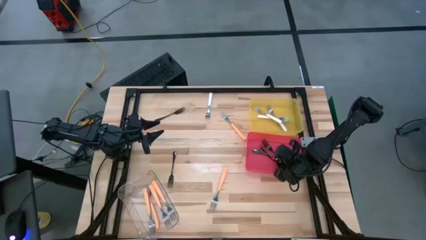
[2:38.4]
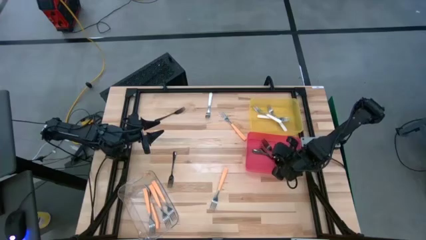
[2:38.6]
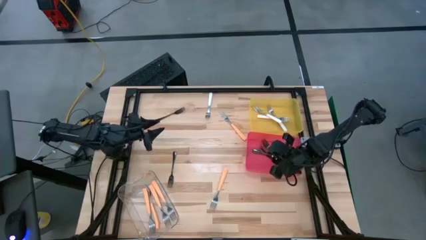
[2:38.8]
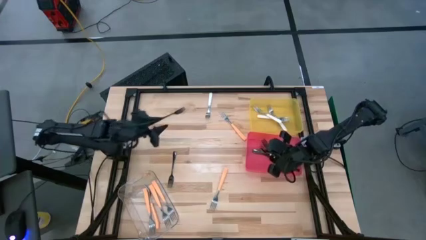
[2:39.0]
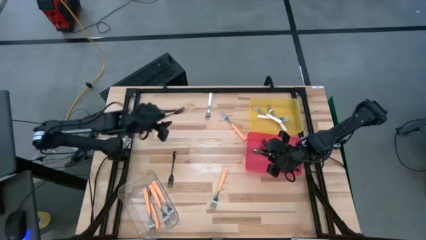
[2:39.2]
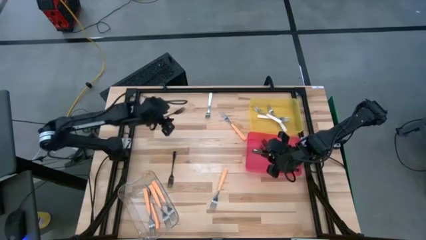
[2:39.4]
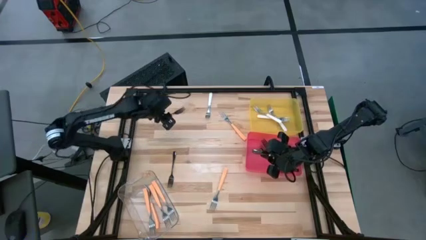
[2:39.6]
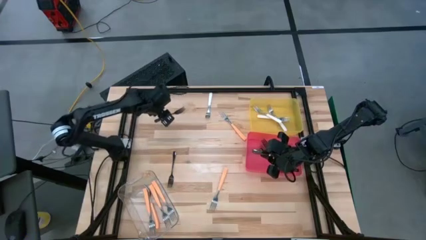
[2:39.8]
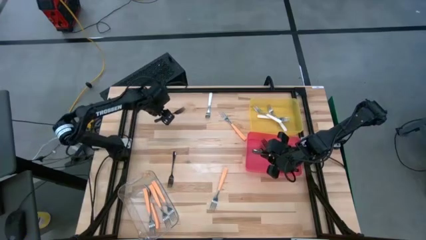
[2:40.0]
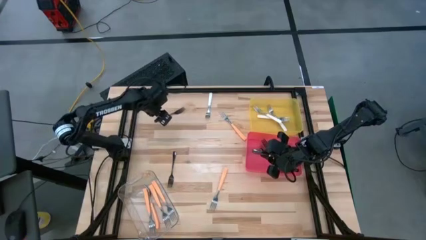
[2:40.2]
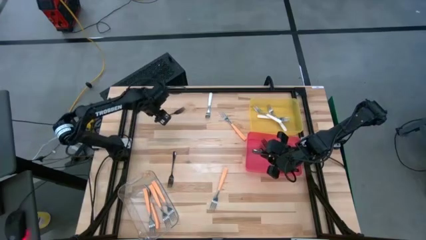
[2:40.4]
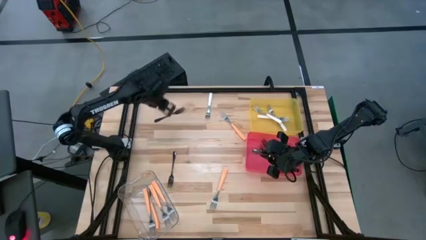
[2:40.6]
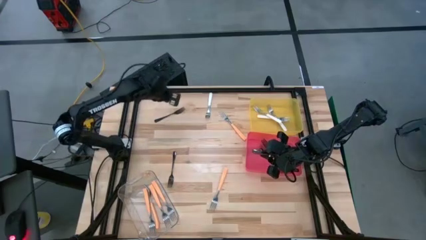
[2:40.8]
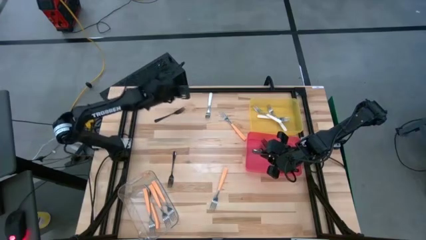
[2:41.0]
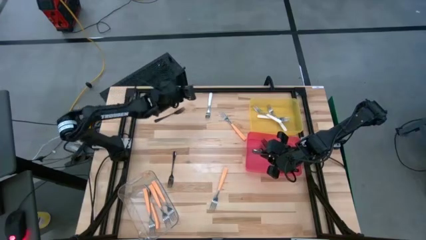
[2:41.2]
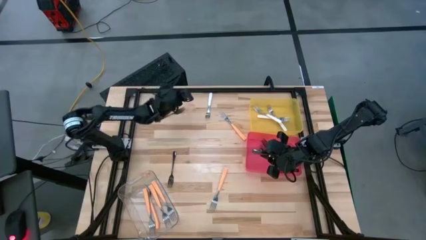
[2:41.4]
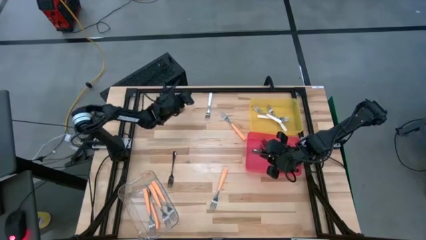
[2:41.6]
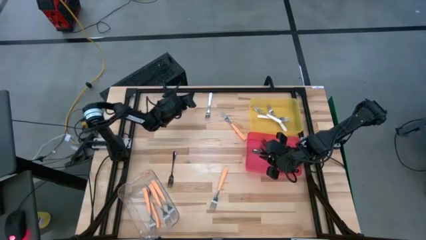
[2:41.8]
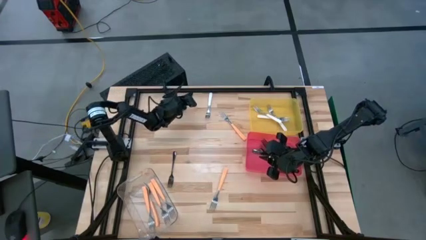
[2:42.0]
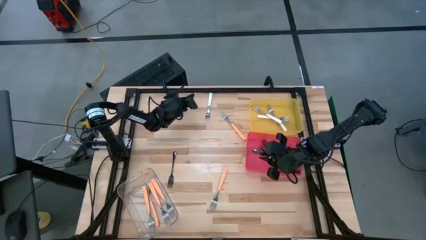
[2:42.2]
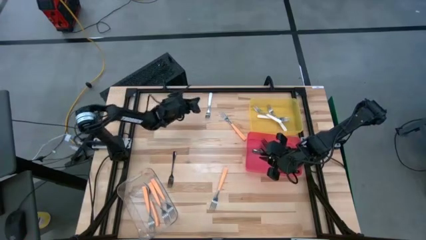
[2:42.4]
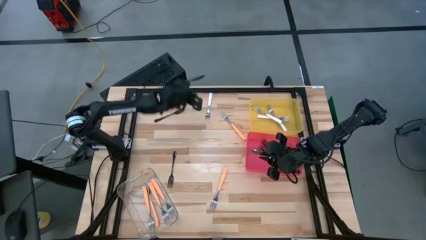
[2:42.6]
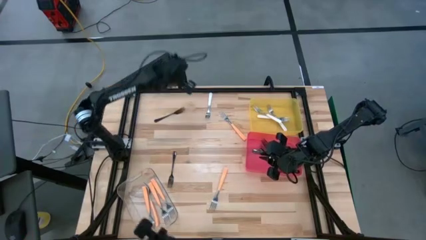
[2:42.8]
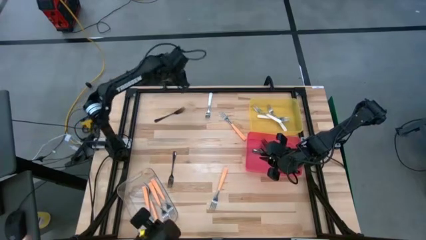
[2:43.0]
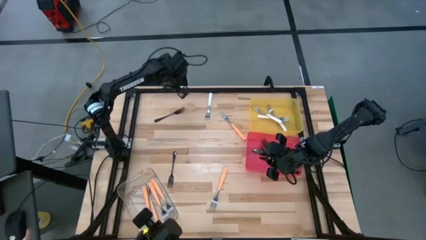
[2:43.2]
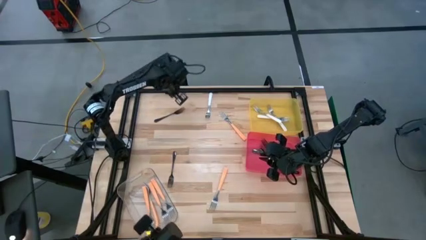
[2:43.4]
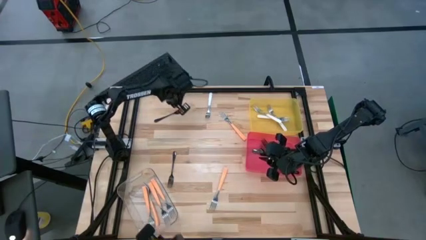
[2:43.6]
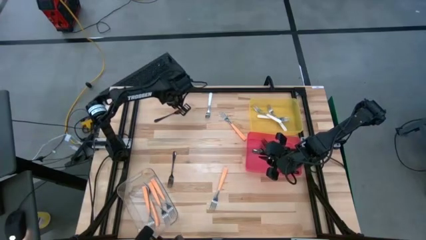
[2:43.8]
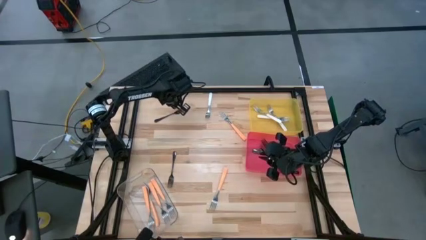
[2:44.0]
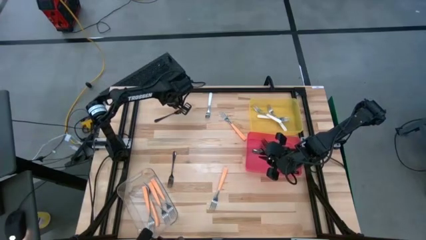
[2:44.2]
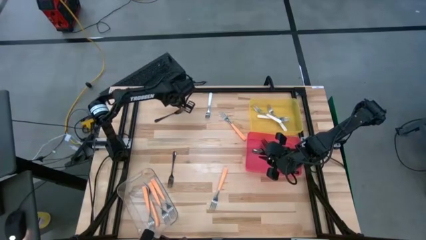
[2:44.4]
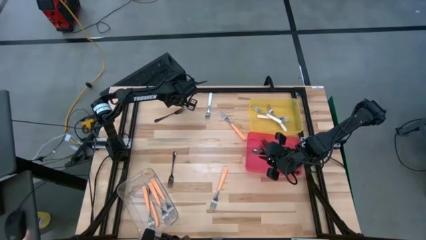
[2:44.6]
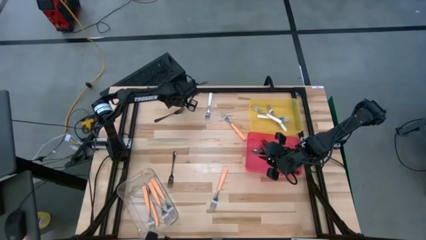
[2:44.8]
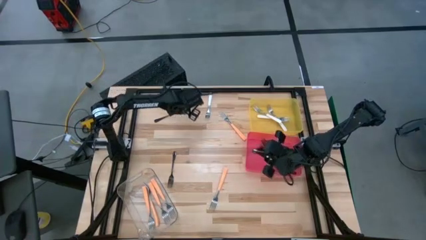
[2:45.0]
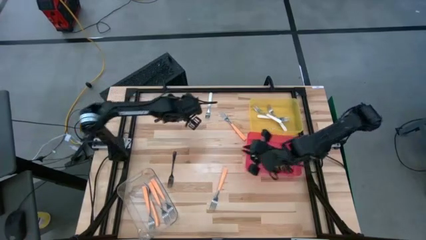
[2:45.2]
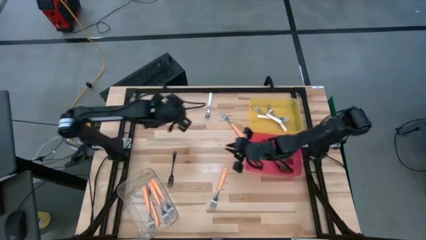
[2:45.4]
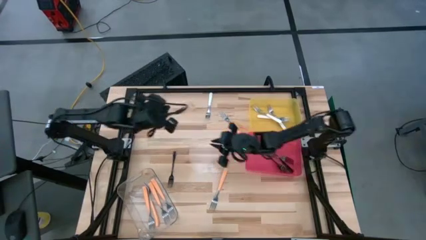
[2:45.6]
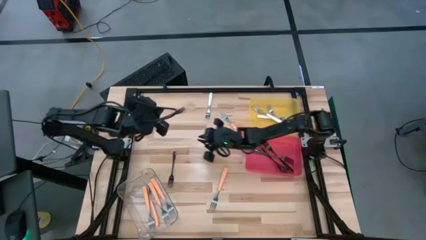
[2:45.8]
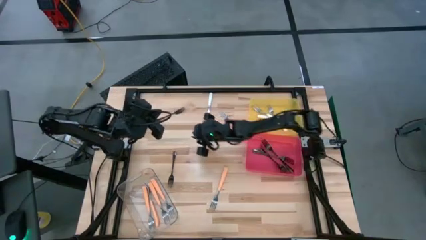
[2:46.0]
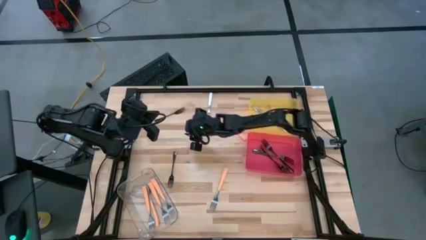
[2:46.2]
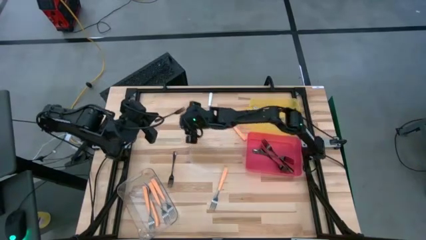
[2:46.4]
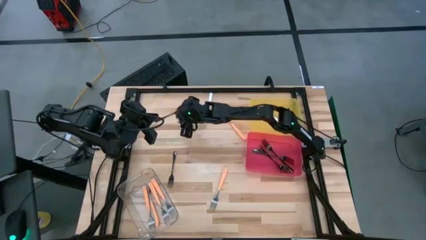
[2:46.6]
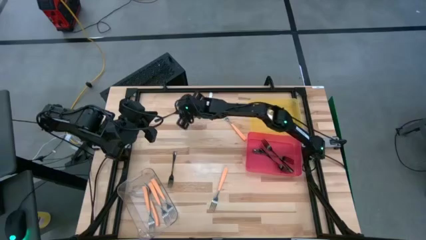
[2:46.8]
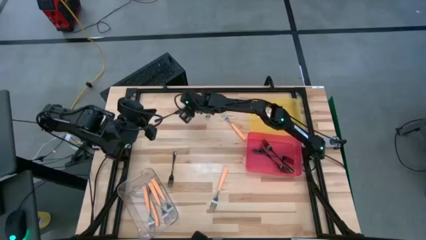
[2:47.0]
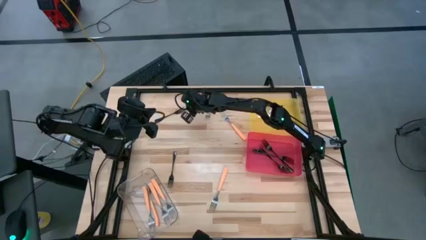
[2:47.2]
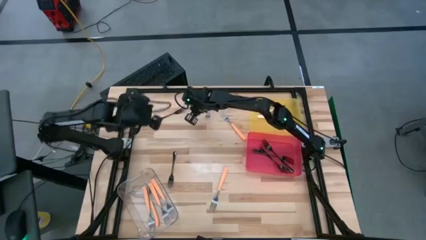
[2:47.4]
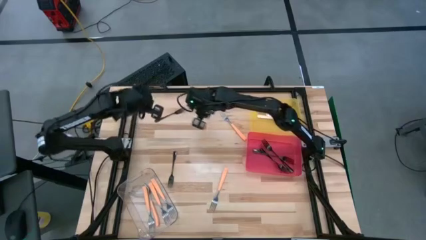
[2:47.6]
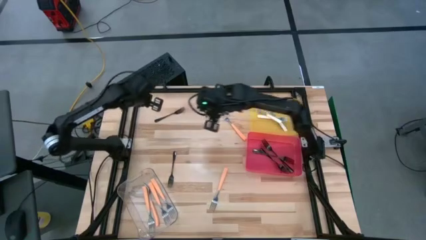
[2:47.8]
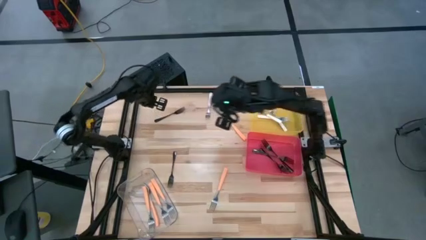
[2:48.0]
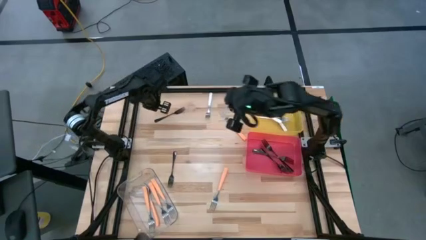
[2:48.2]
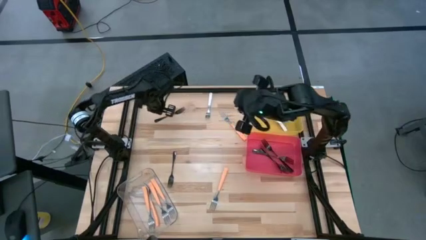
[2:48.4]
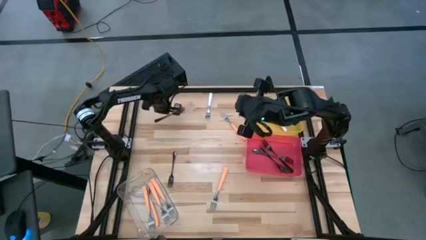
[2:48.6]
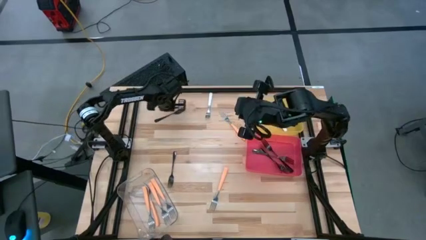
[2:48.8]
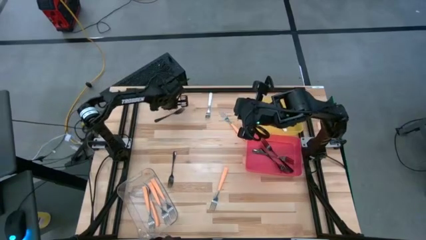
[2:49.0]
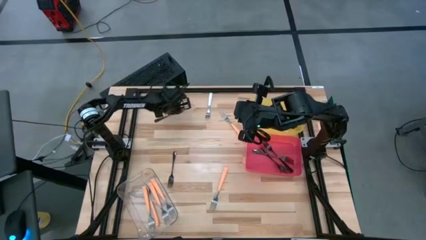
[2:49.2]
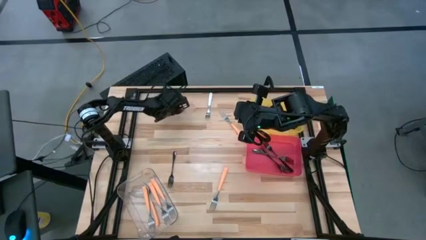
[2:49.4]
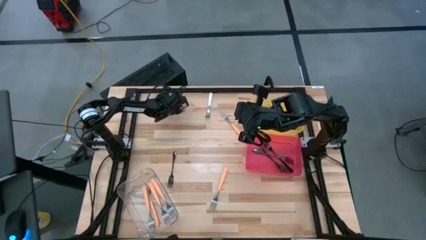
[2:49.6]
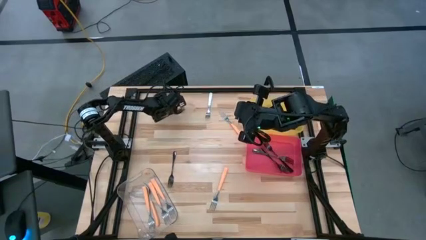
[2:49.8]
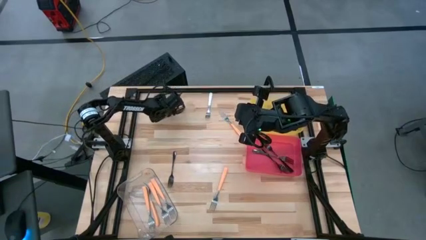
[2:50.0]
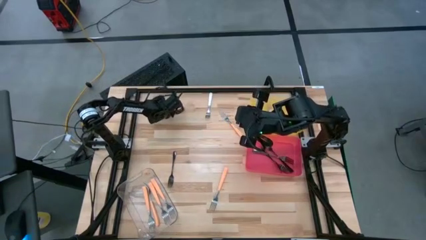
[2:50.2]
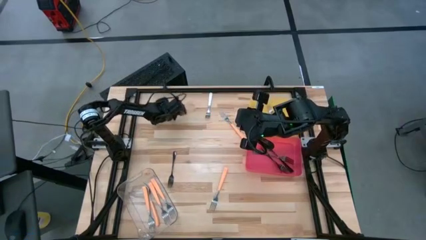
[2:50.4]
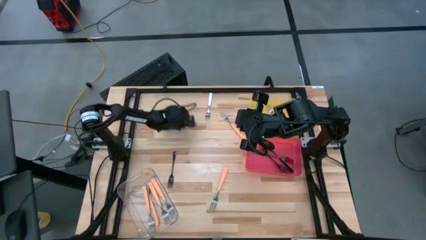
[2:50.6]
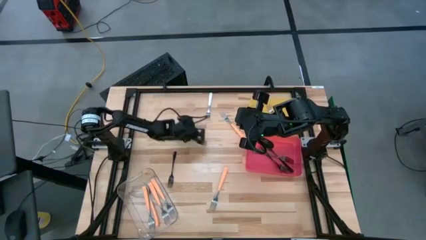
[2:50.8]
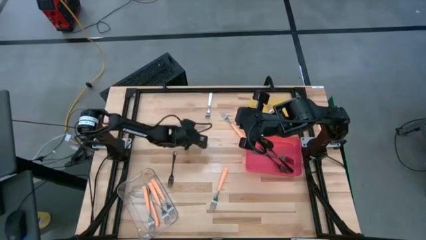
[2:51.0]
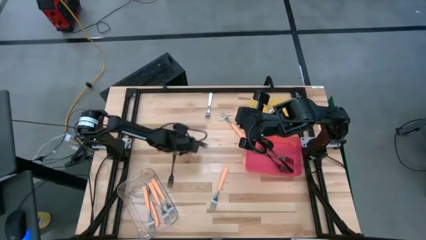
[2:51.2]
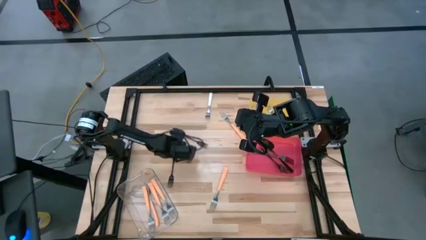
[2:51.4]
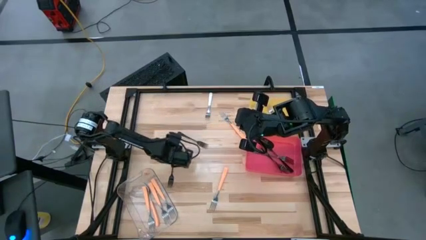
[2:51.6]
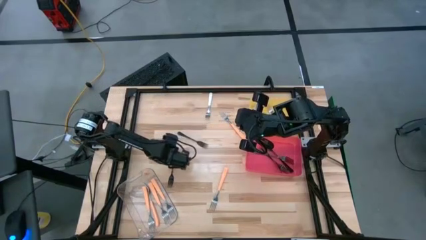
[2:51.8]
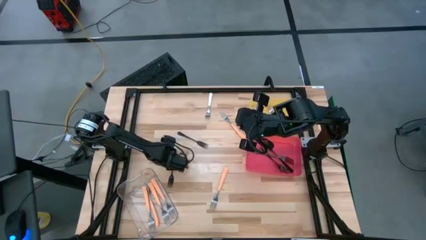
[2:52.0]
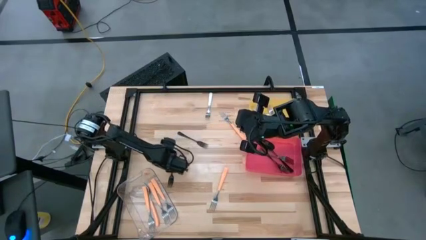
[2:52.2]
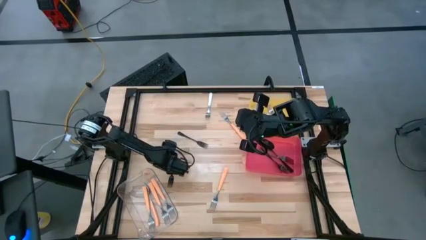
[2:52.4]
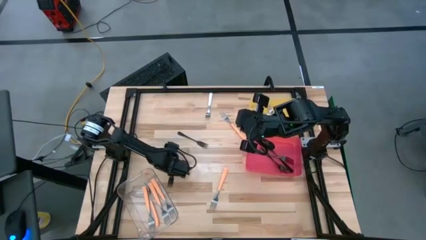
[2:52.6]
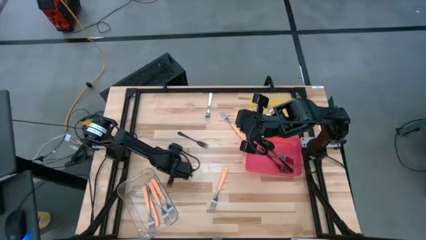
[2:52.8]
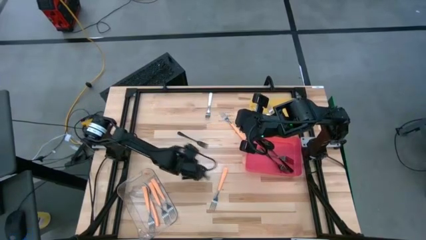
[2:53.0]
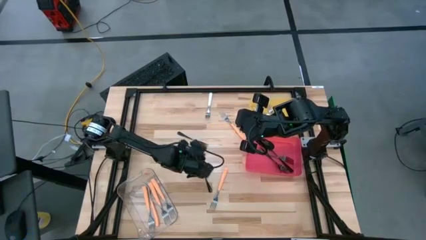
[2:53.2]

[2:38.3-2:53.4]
Task: Sort silverware by color (type)
Move the black forks to the center of the table

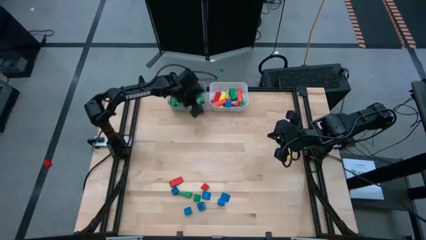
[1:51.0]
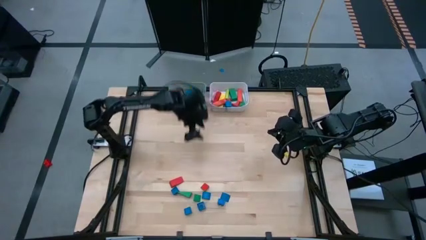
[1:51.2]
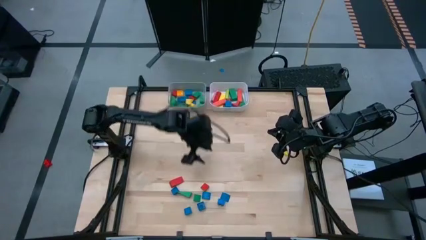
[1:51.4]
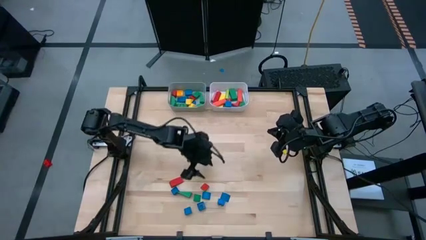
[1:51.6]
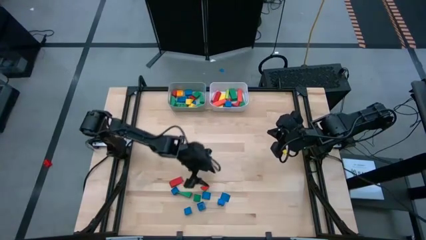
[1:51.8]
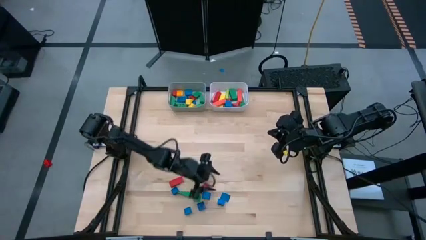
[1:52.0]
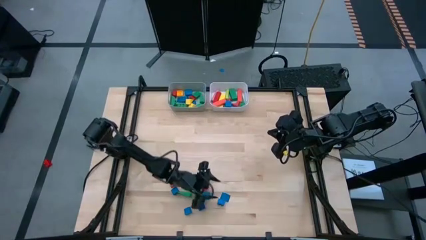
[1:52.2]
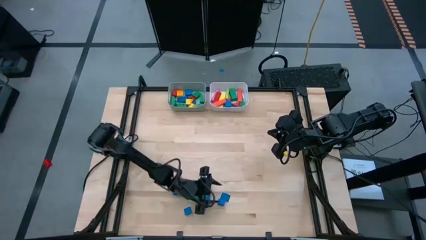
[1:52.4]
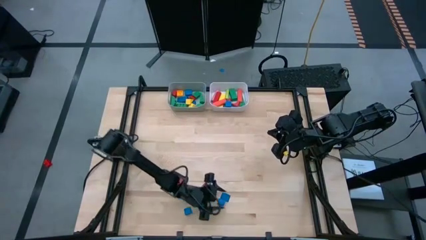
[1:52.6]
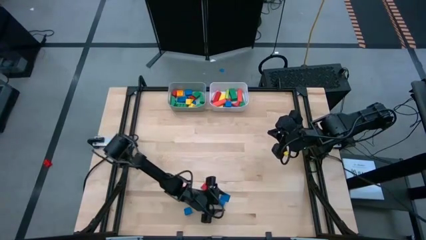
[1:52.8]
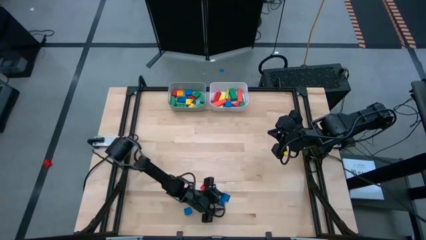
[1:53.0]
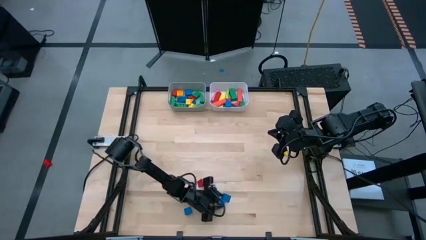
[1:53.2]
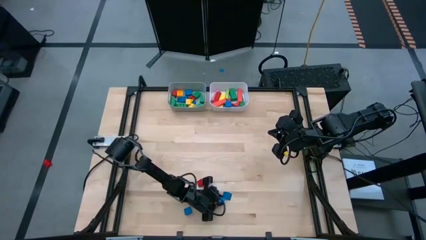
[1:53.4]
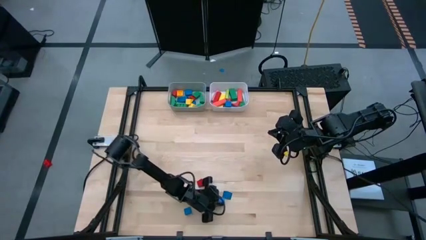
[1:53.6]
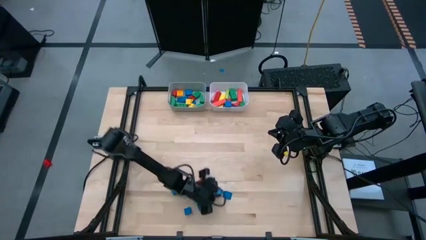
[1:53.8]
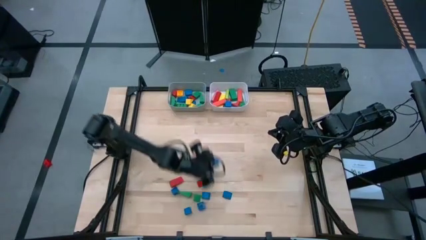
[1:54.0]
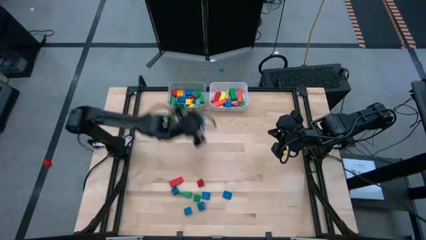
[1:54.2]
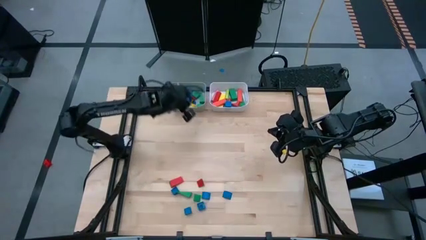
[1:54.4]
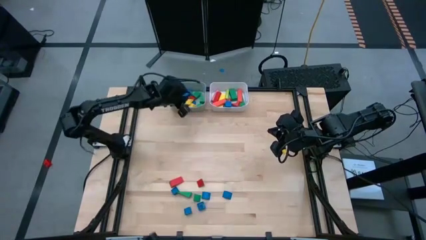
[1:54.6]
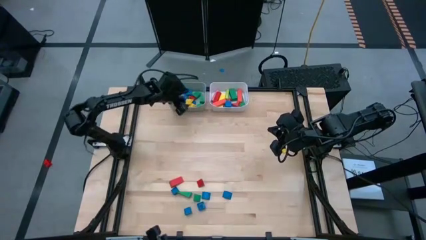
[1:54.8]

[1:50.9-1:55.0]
Task: Sort blocks by size
Put the blue 4-stud game piece into the gray bin
